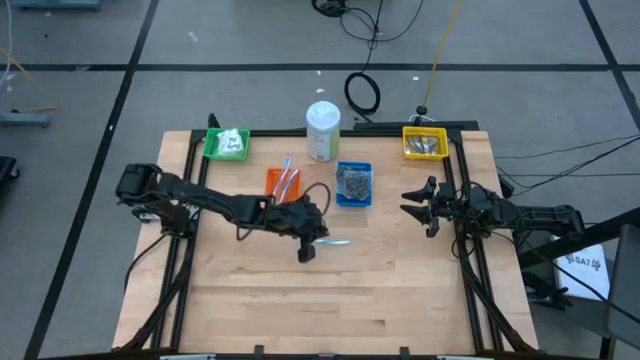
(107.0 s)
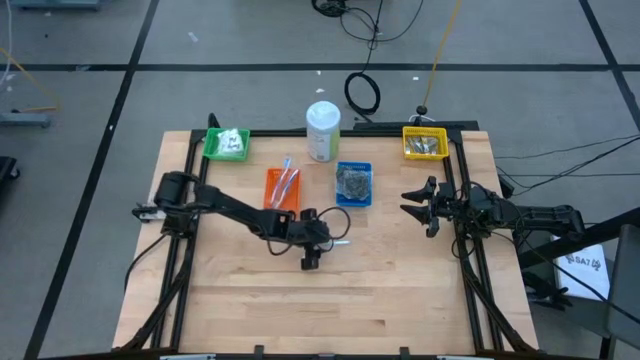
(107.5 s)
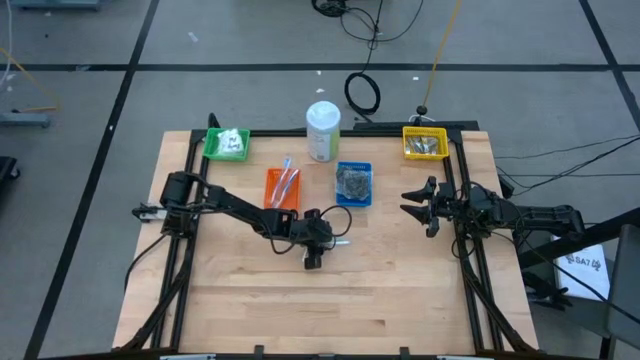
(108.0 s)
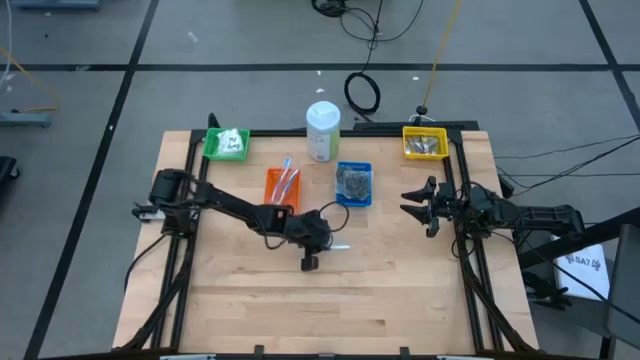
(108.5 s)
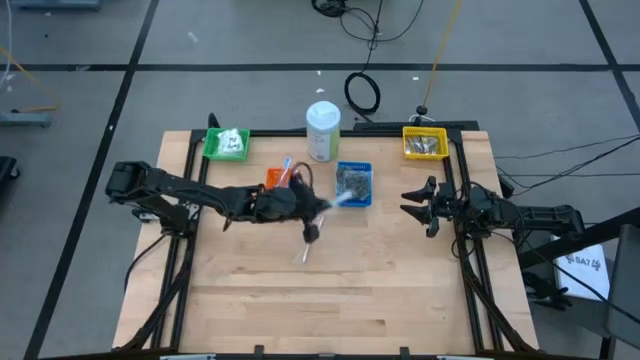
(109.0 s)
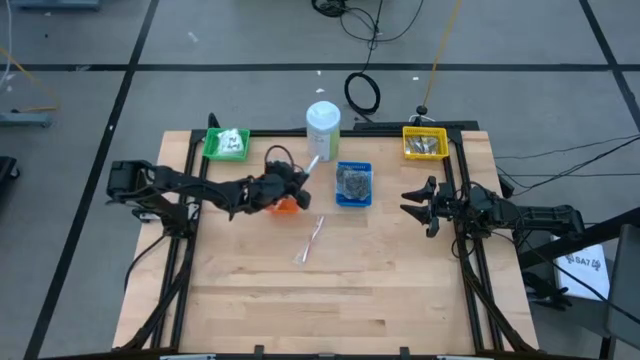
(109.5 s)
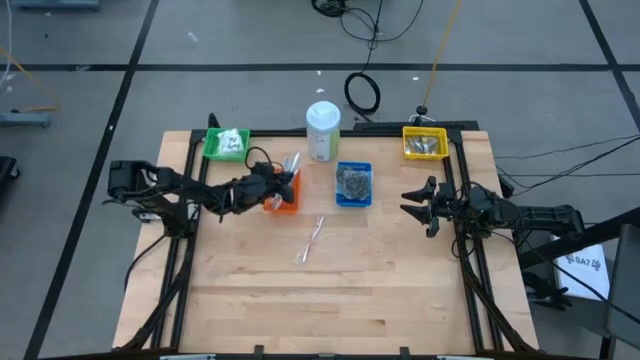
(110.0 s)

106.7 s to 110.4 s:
Task: Pick & Place Travel size toiletries
Put the green blue toothbrush into the orange bin

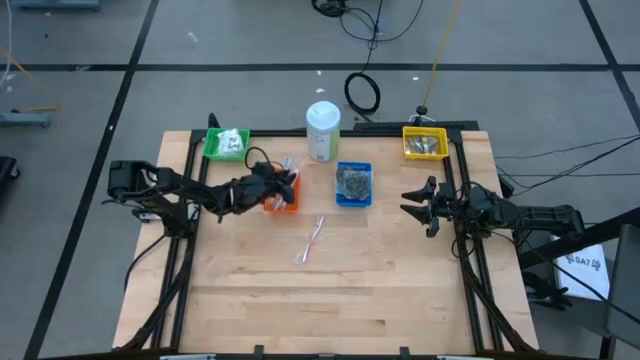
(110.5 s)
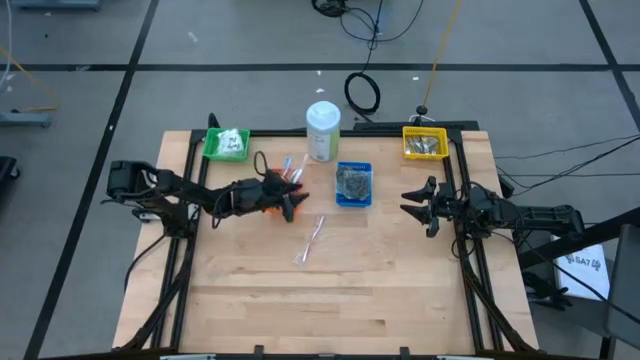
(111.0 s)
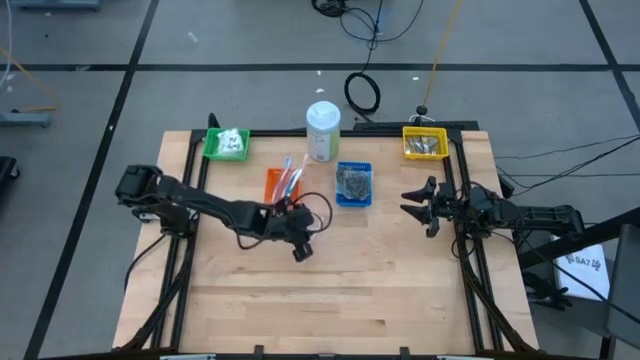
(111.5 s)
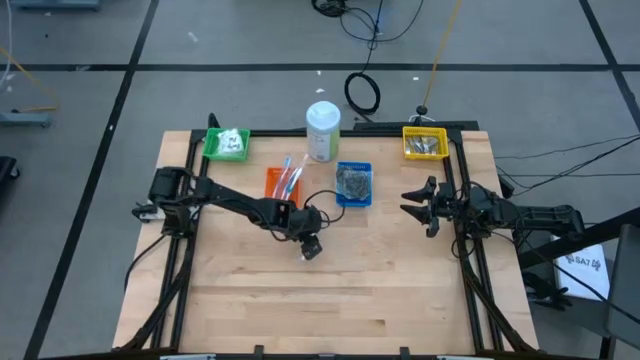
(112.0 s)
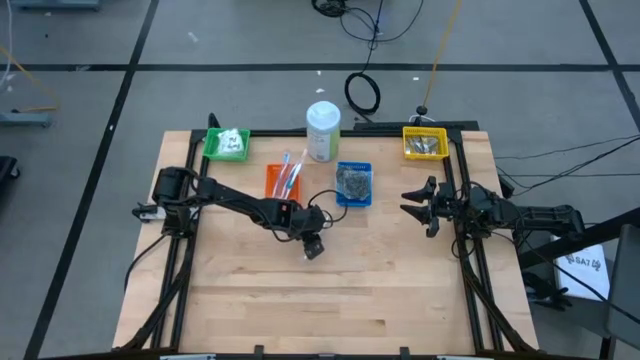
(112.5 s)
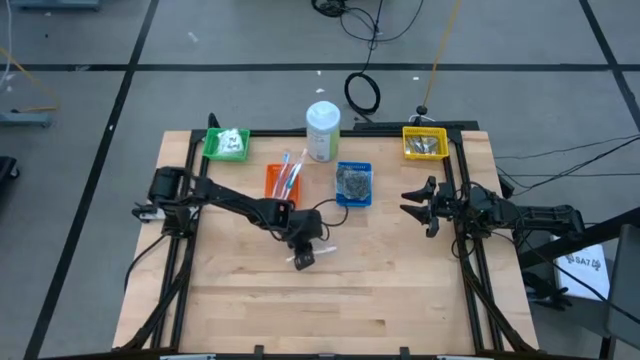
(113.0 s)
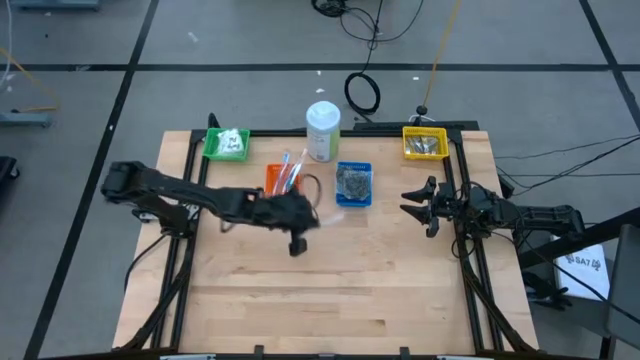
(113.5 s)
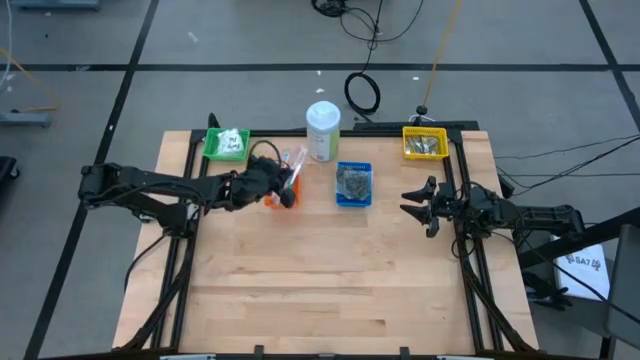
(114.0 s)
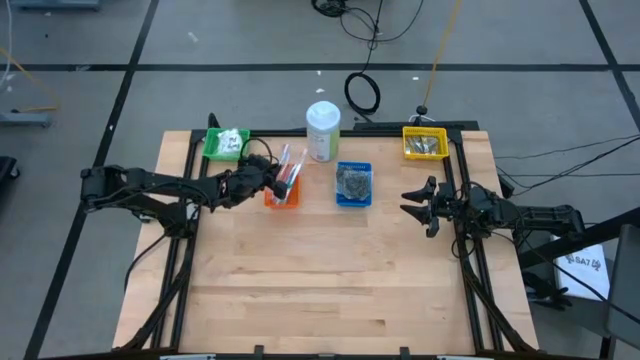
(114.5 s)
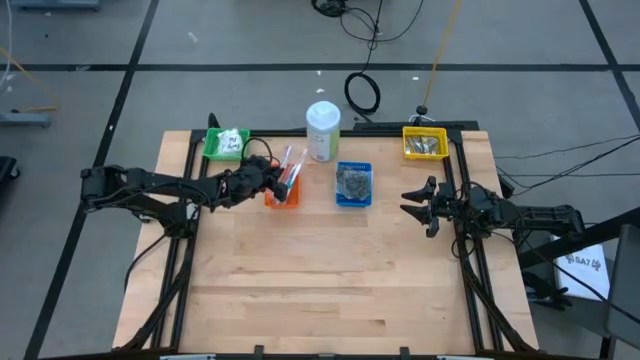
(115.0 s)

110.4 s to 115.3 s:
Put the orange toothbrush into the orange bin

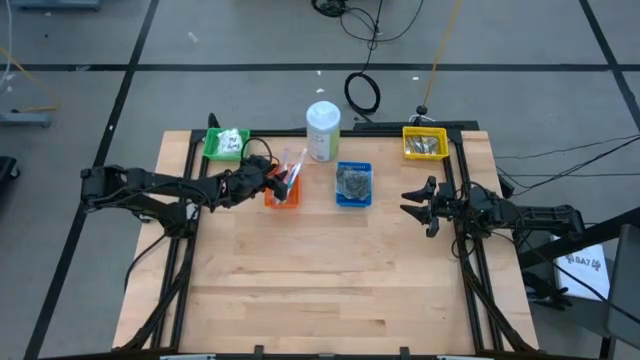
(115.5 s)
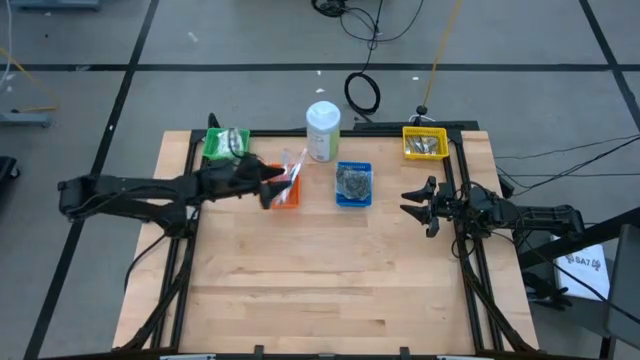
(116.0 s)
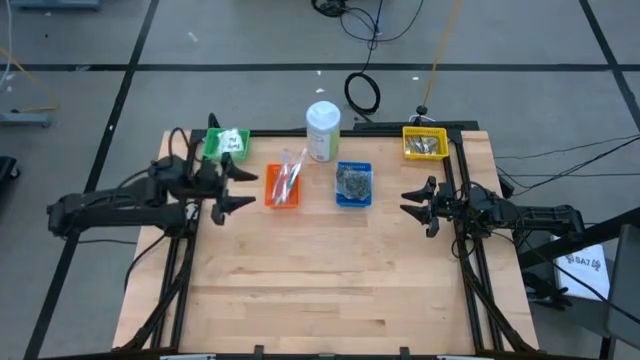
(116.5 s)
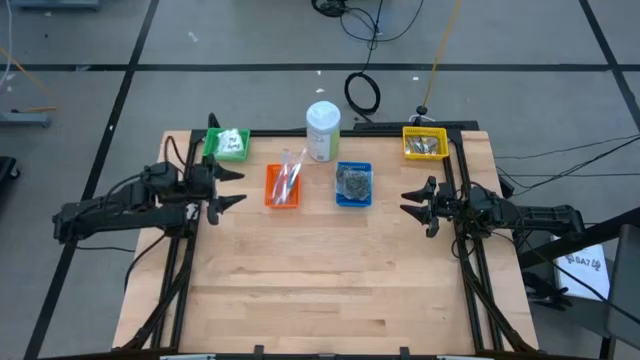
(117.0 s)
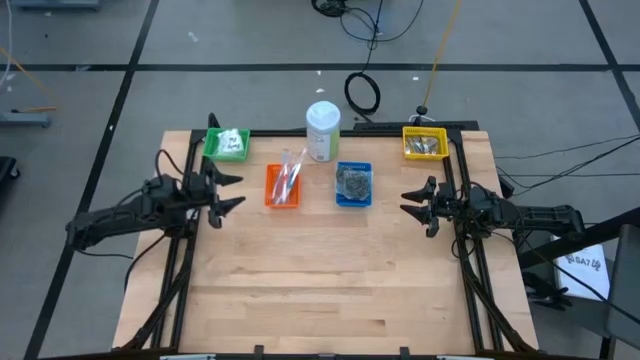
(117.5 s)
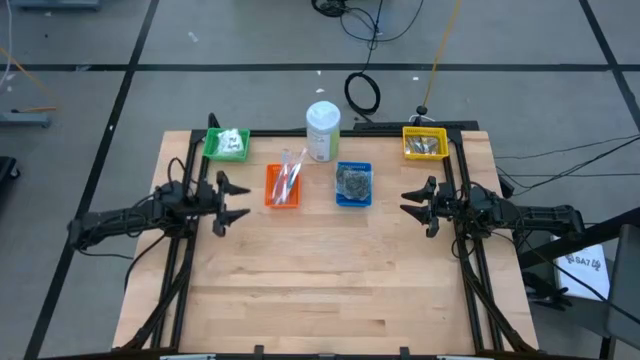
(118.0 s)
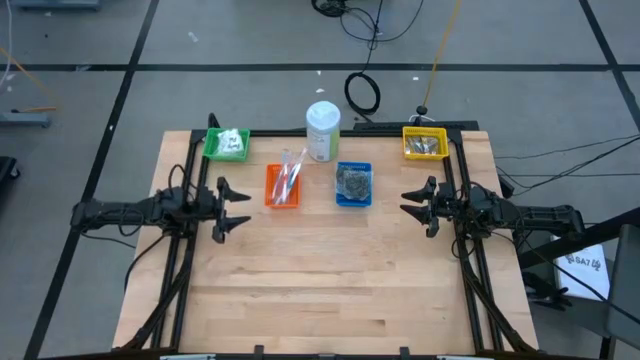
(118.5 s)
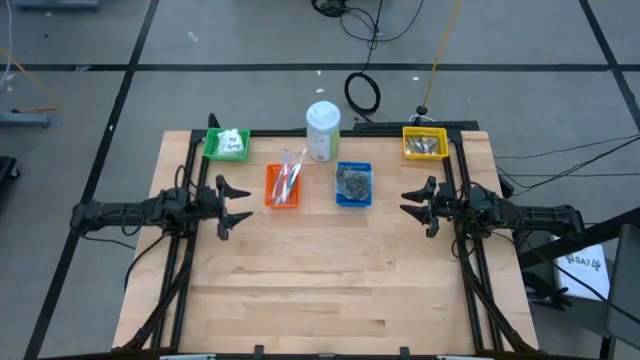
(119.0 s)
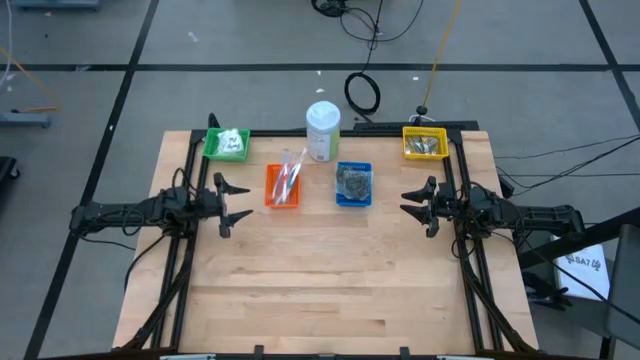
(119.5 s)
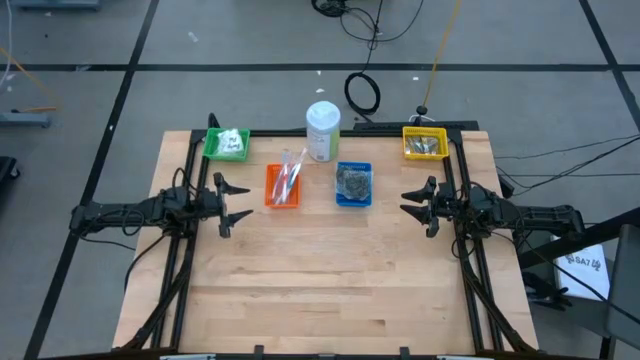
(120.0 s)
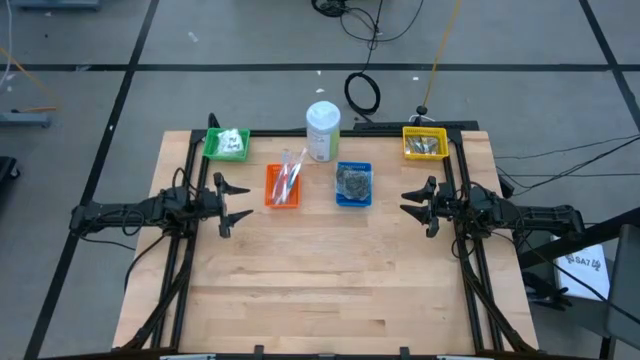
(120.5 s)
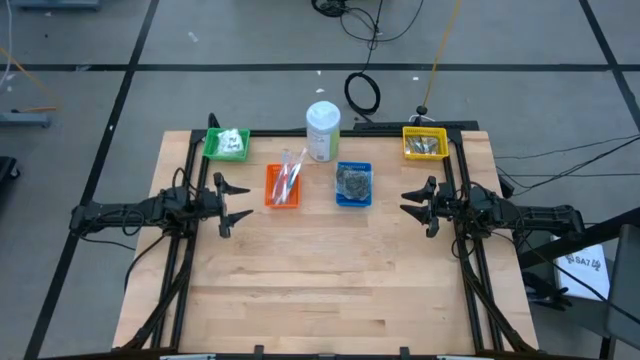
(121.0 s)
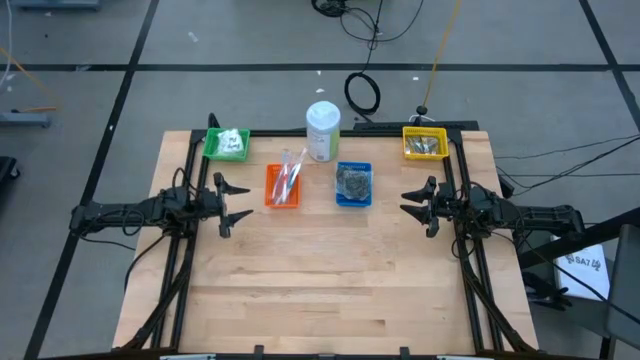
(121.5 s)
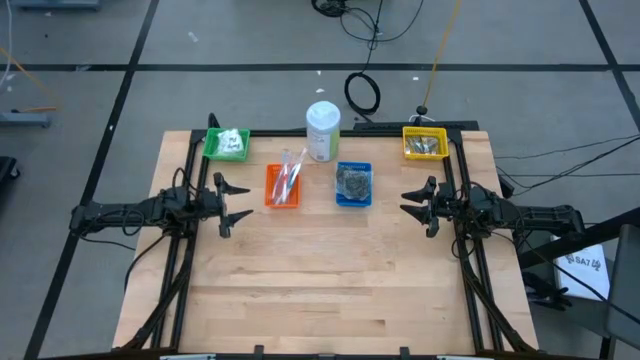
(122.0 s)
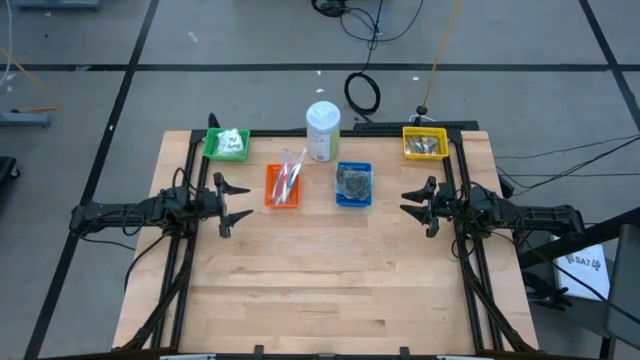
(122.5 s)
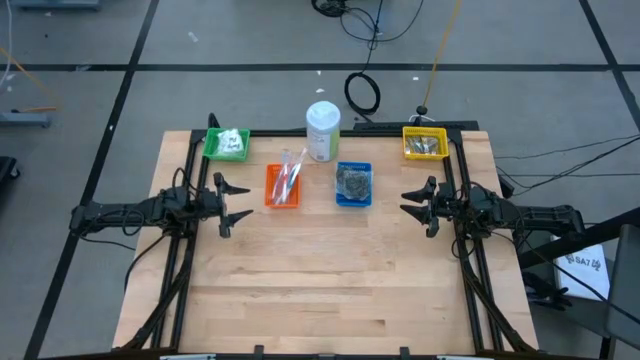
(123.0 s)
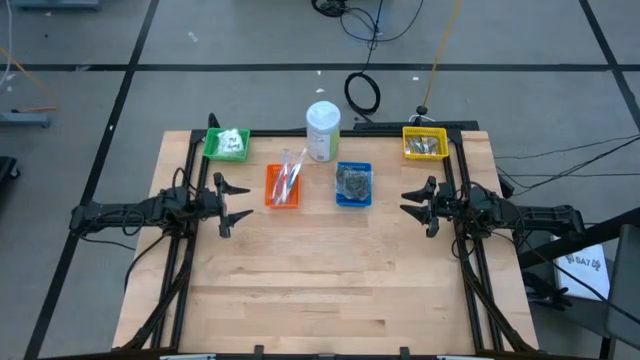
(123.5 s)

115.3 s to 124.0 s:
Return to Home Position

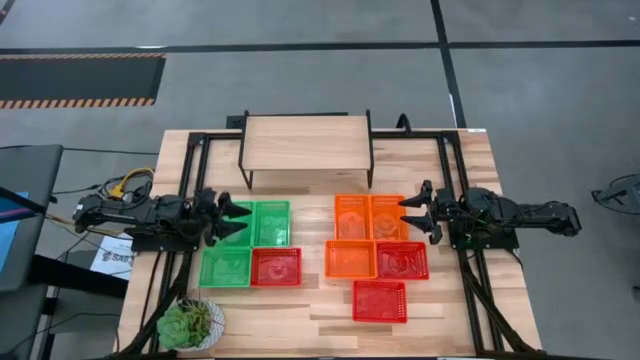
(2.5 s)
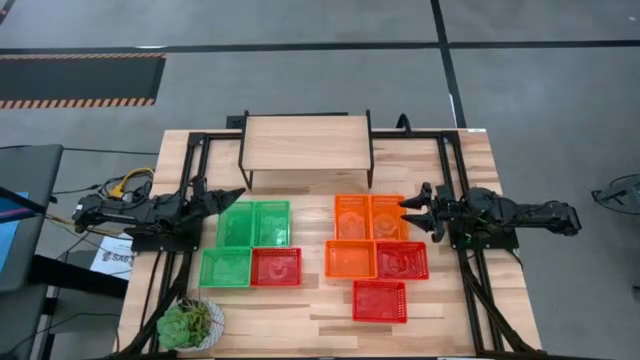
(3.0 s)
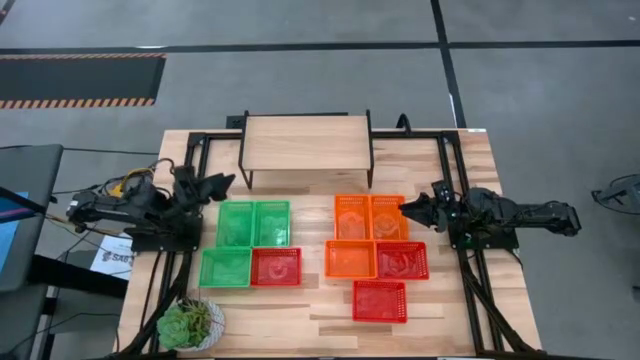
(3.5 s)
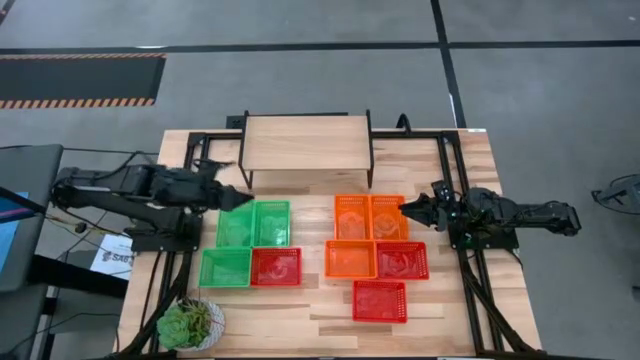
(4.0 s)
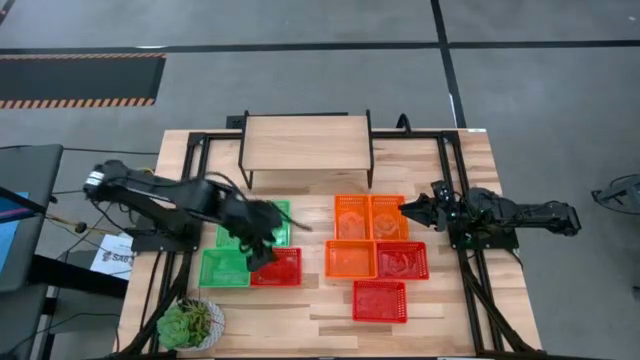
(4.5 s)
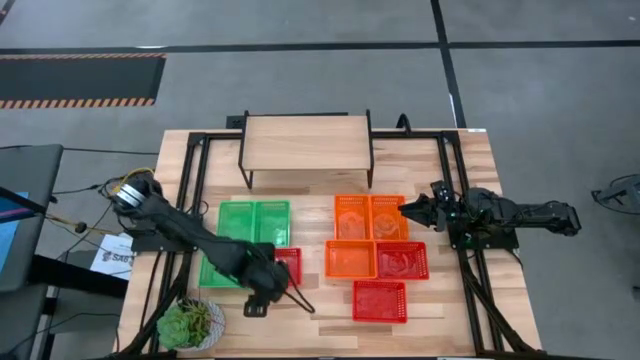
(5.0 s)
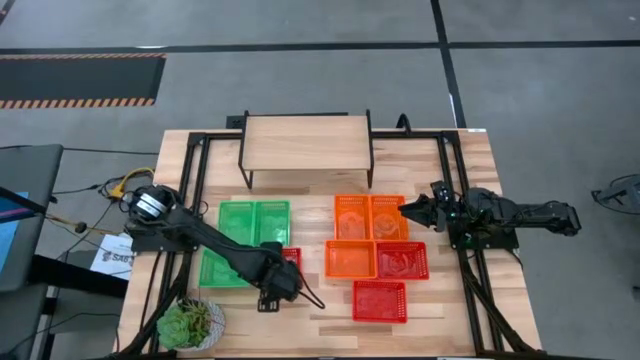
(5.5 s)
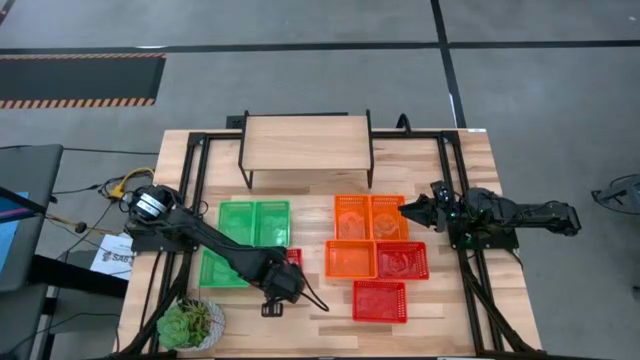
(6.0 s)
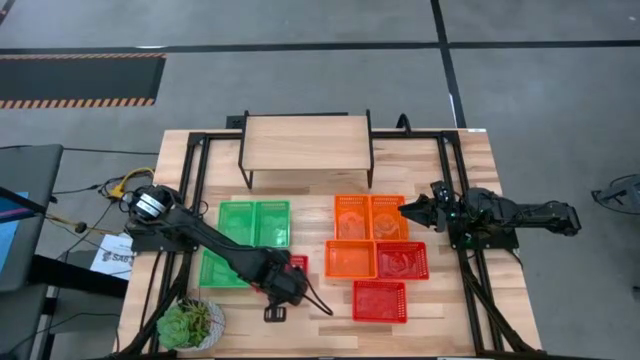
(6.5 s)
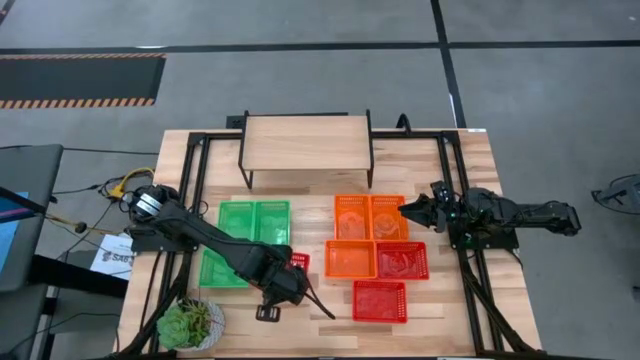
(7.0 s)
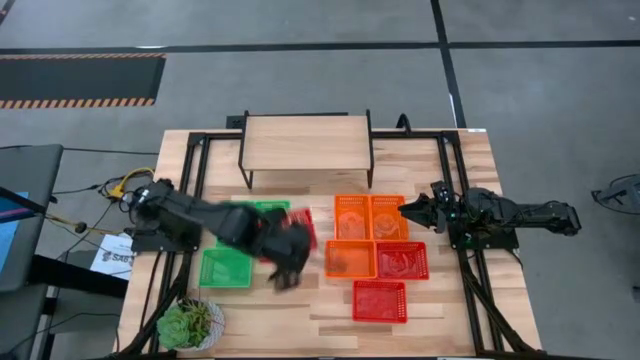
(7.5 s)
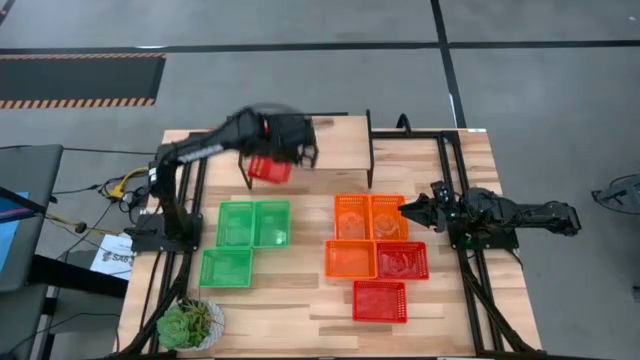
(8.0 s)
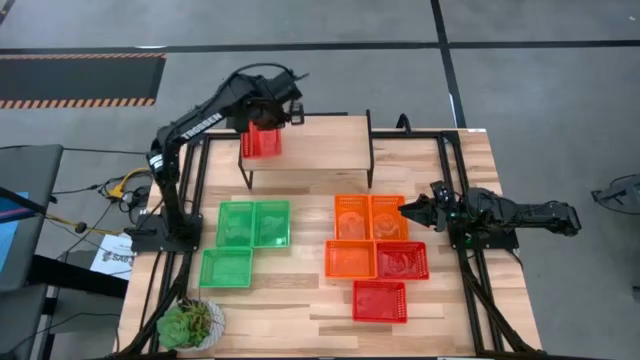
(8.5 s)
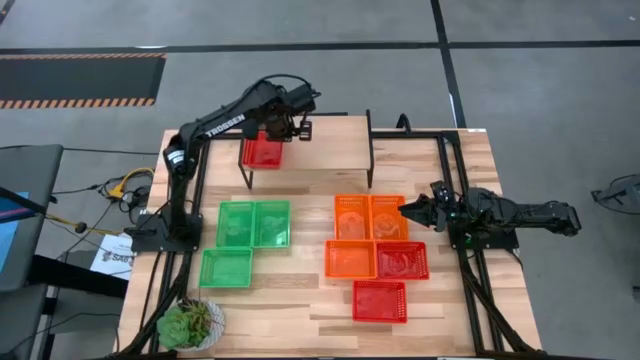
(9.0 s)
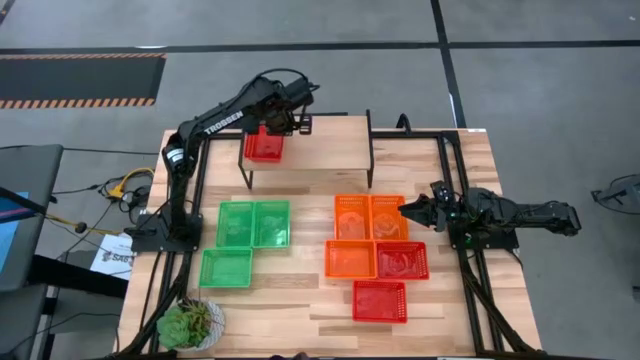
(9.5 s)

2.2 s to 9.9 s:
Task: Stack baskets on shelf by color
Put the left red bin on the shelf
